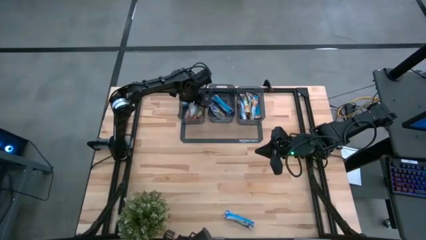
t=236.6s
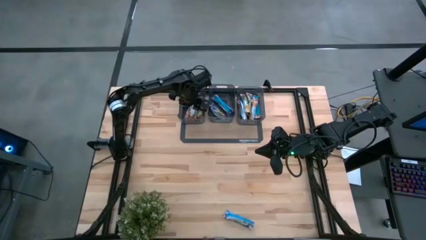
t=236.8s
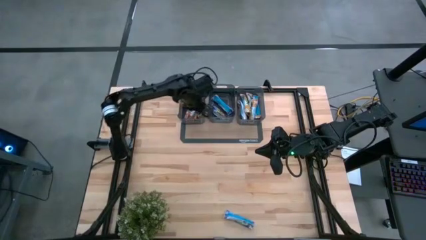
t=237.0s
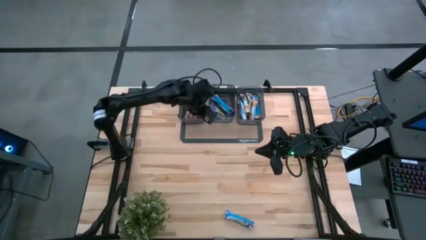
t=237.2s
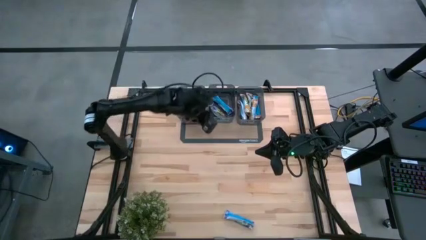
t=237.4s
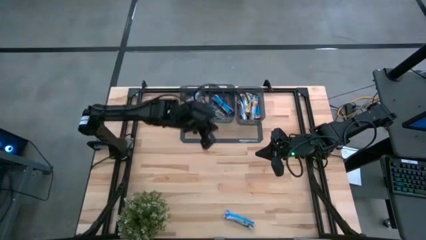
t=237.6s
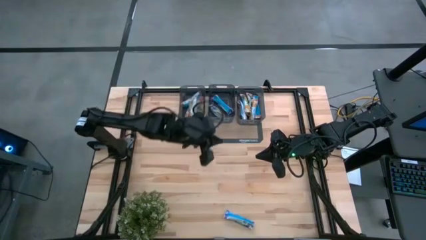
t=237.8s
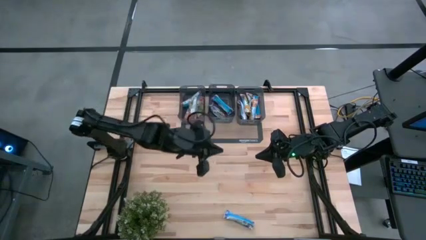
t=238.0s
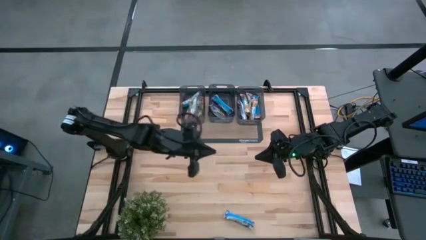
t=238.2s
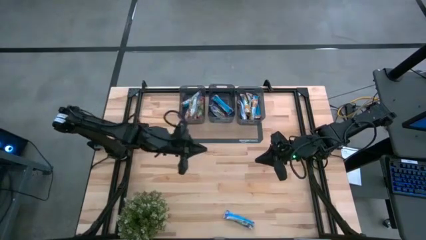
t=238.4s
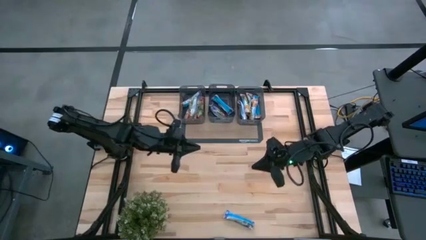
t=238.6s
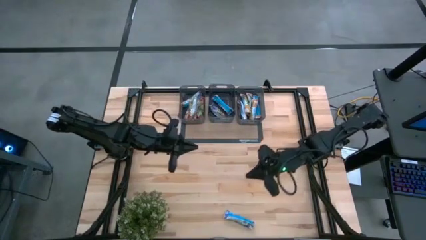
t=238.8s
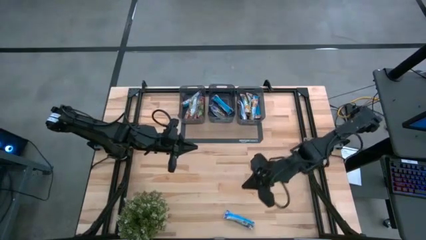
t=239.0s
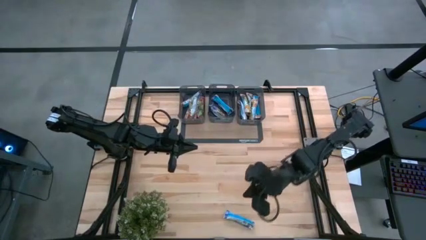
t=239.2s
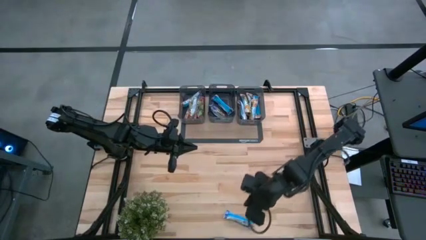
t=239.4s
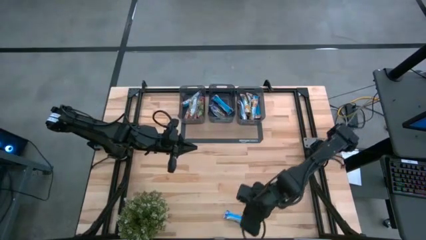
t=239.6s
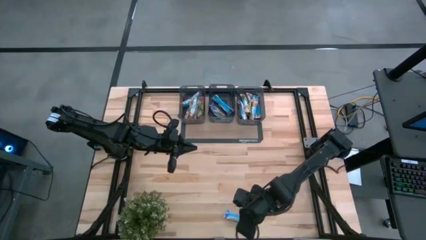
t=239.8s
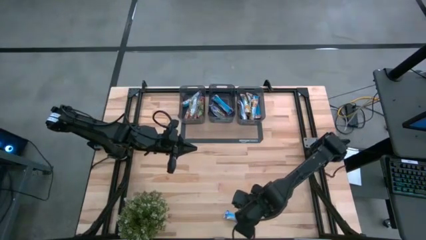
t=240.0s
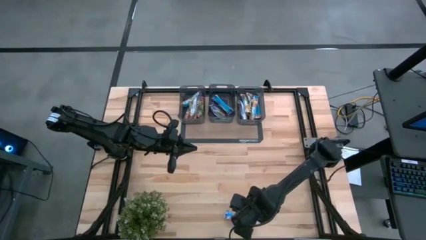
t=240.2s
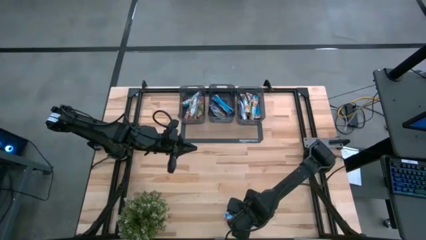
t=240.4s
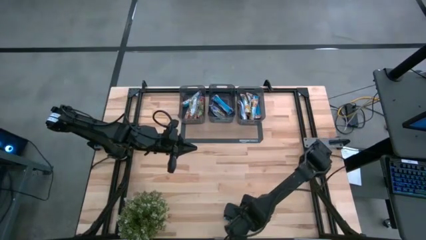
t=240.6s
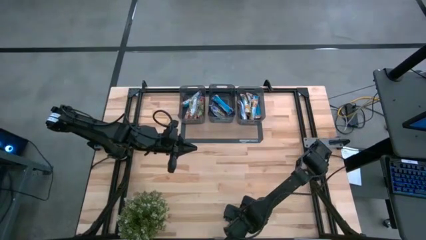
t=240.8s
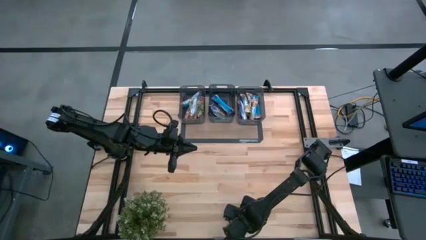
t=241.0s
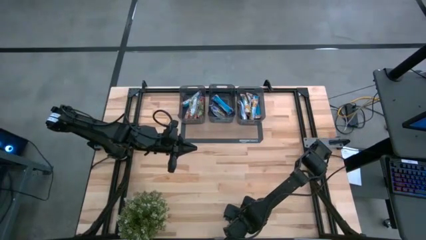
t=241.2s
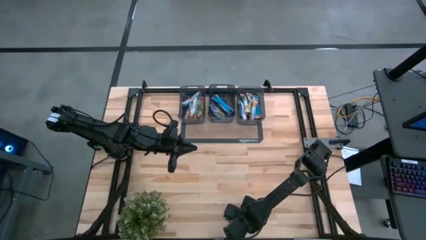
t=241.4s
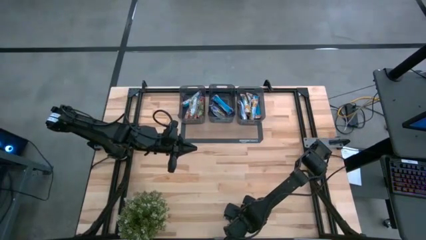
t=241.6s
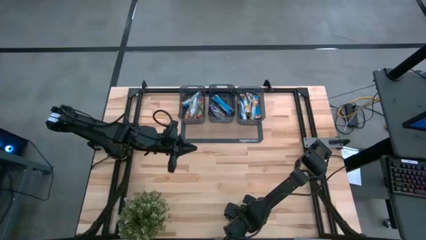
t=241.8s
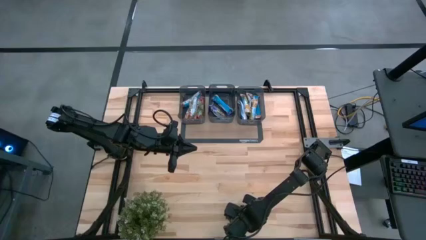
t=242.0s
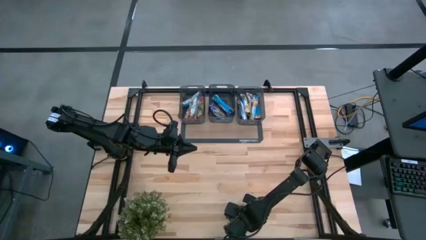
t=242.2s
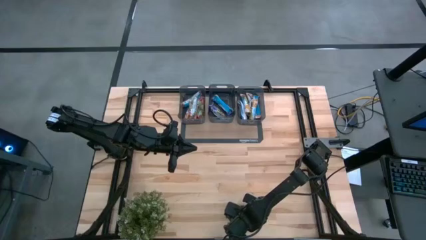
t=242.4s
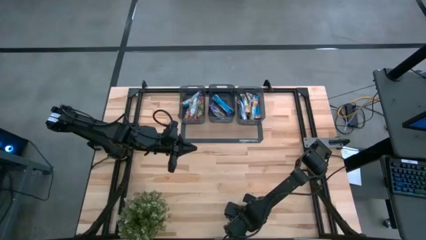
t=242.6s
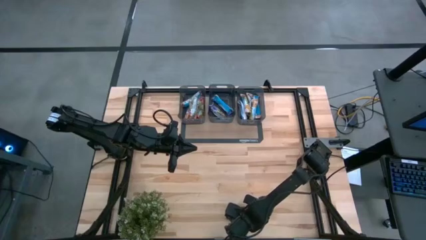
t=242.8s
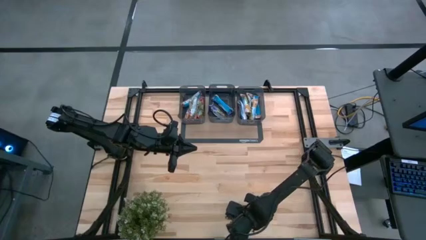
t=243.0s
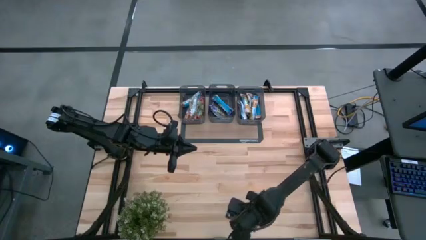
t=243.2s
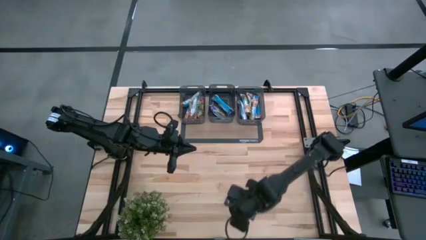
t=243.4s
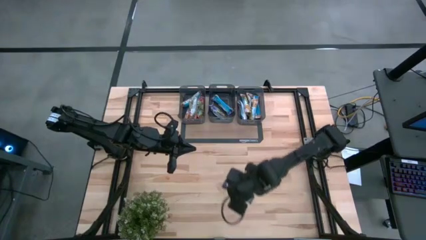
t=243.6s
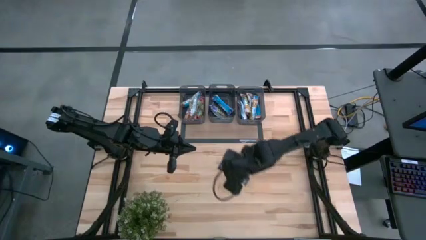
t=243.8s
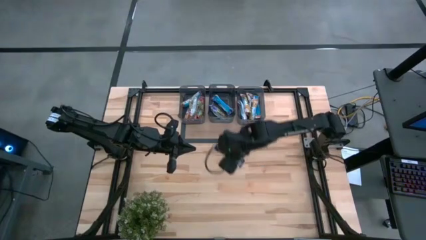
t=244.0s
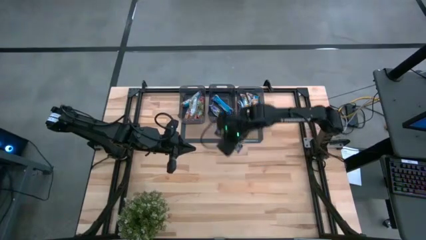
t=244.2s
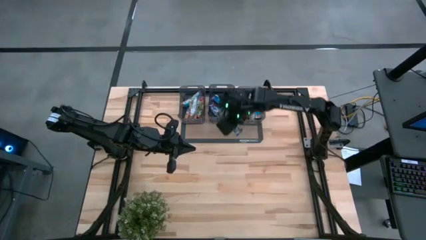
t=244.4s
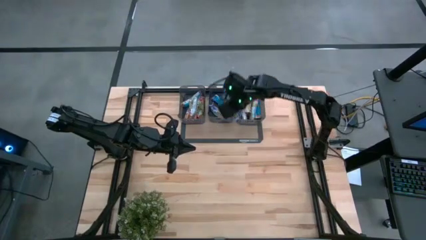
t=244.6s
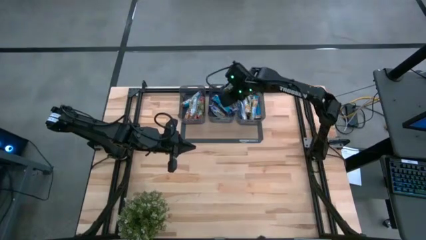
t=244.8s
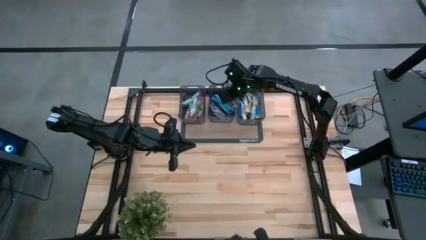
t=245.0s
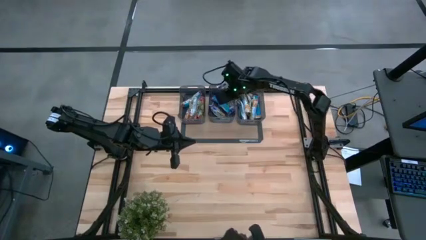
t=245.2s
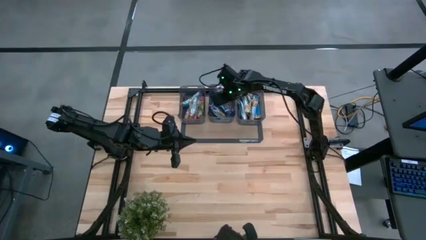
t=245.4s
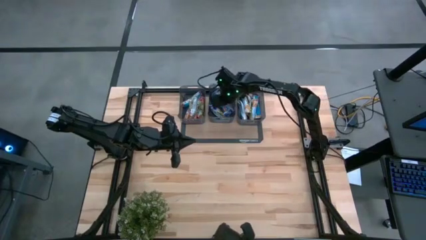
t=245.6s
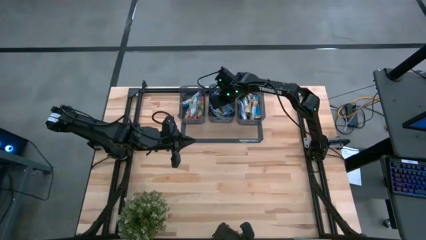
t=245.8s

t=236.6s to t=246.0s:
Task: Pick and place Granola Bars by type
Put the blue granola bar into the center black bin

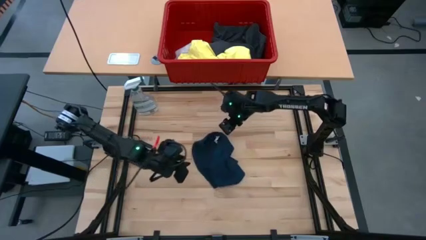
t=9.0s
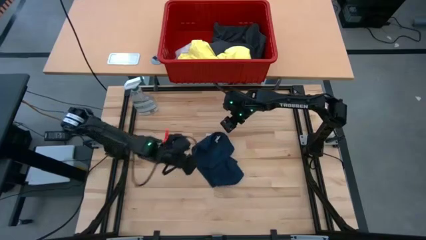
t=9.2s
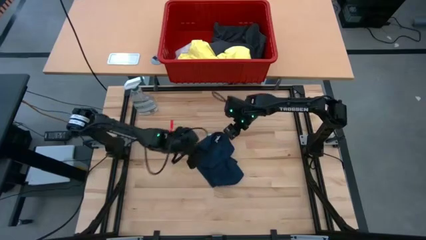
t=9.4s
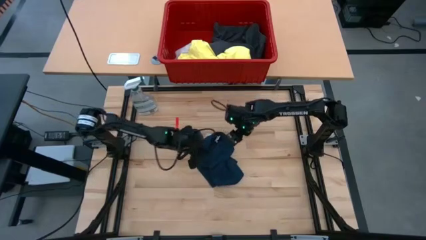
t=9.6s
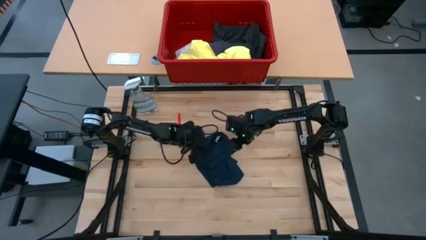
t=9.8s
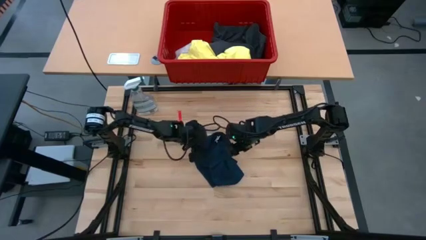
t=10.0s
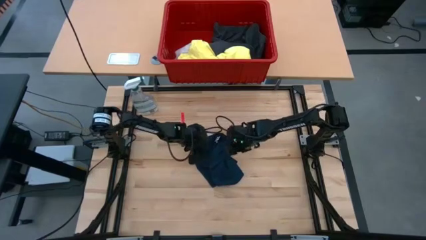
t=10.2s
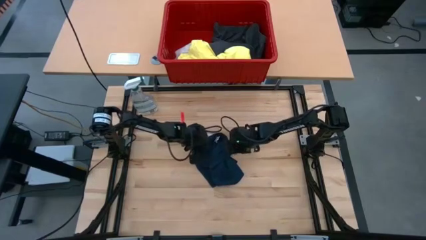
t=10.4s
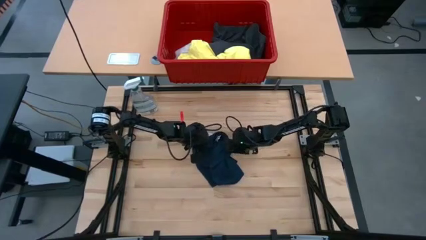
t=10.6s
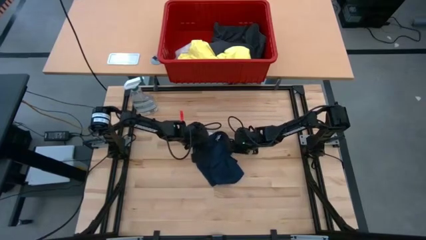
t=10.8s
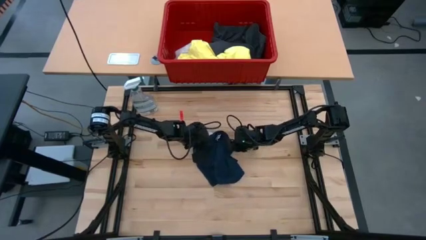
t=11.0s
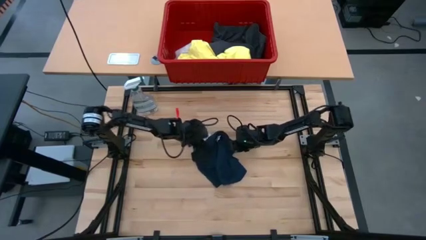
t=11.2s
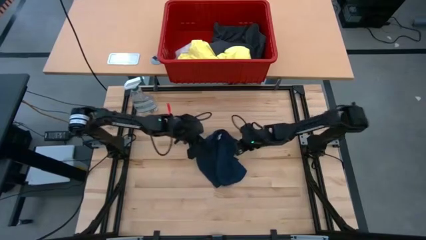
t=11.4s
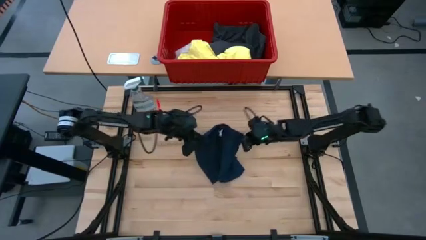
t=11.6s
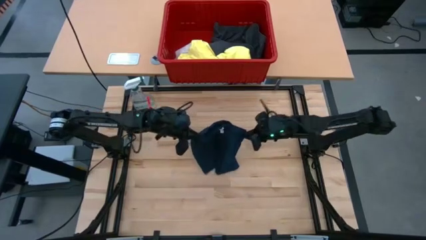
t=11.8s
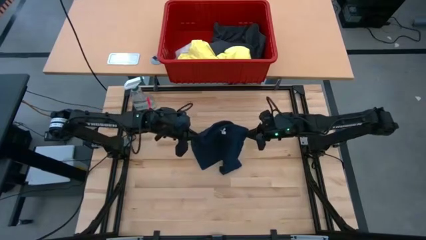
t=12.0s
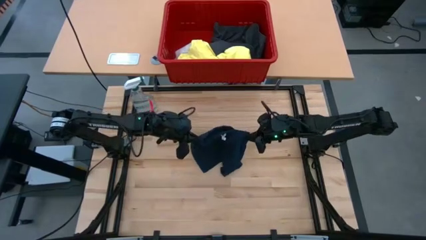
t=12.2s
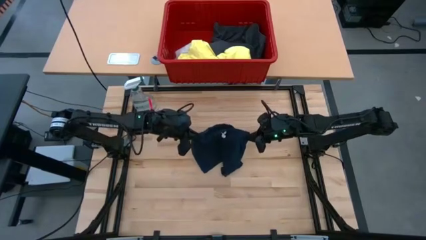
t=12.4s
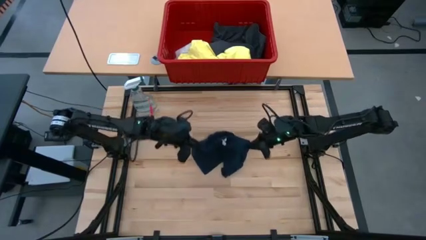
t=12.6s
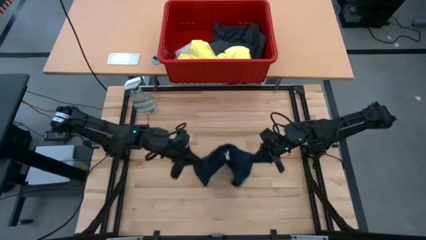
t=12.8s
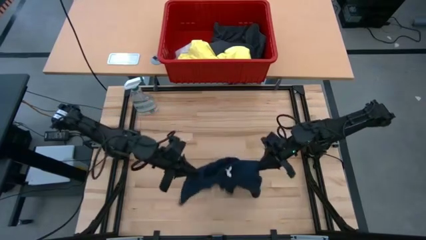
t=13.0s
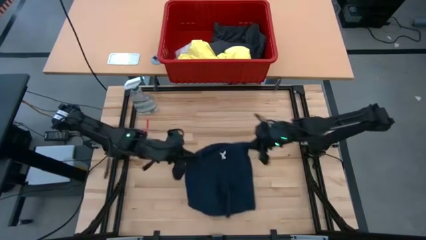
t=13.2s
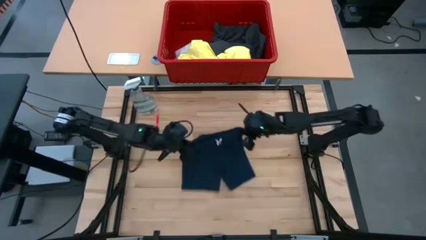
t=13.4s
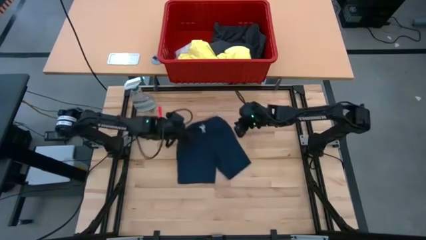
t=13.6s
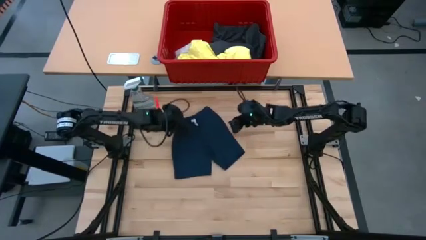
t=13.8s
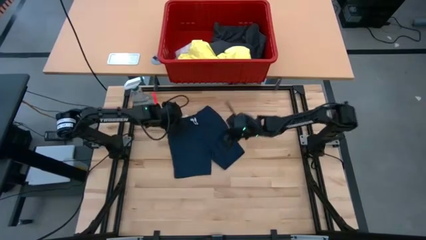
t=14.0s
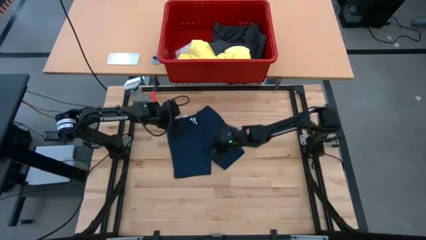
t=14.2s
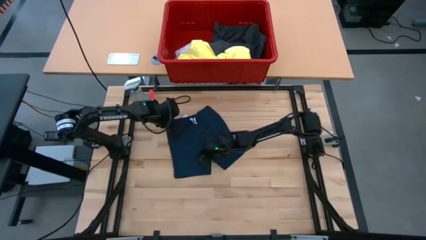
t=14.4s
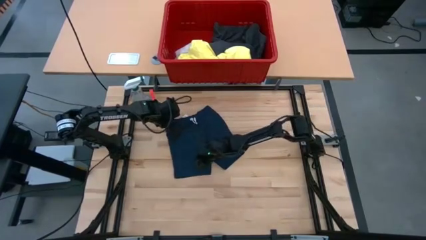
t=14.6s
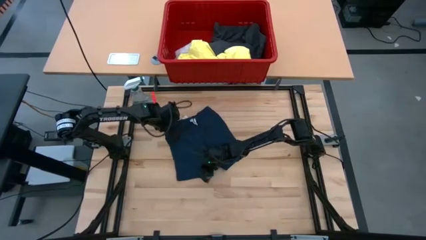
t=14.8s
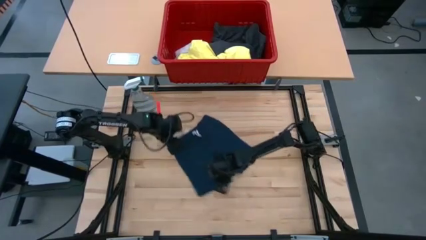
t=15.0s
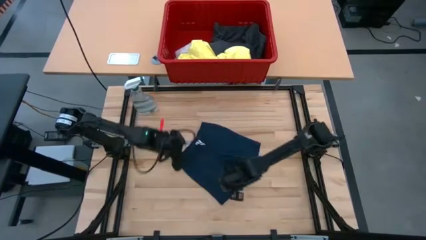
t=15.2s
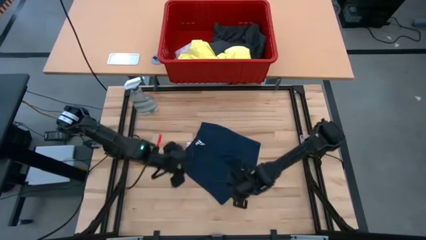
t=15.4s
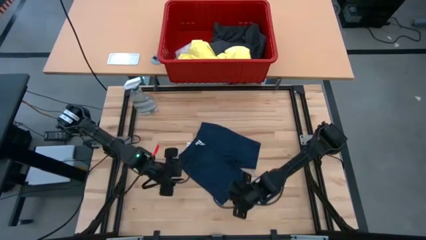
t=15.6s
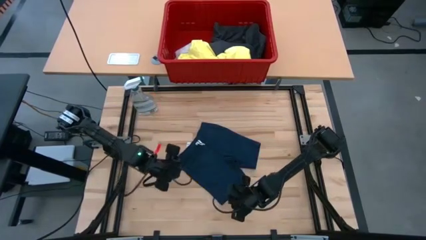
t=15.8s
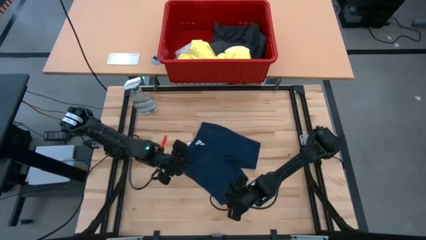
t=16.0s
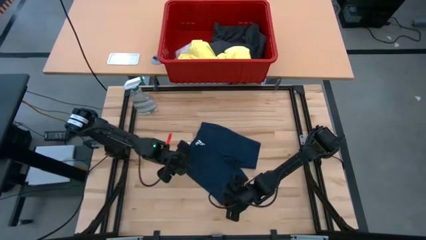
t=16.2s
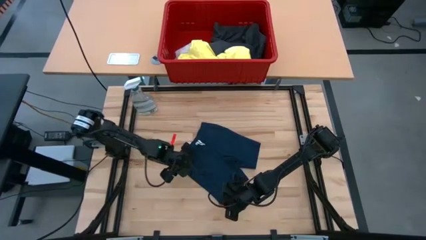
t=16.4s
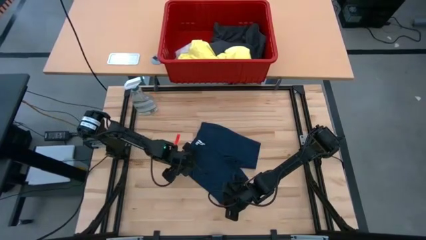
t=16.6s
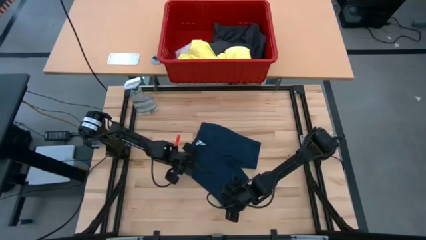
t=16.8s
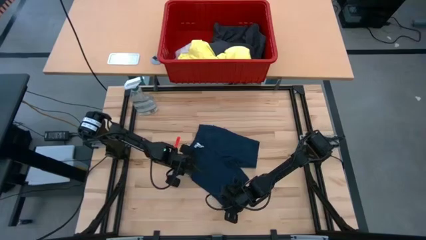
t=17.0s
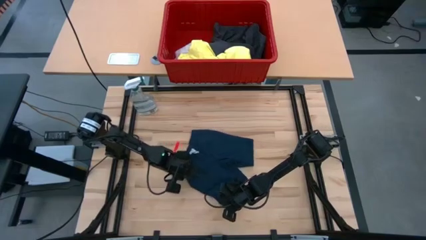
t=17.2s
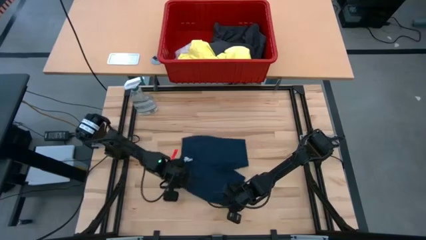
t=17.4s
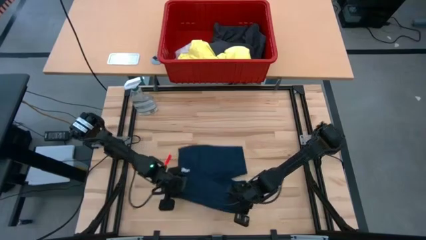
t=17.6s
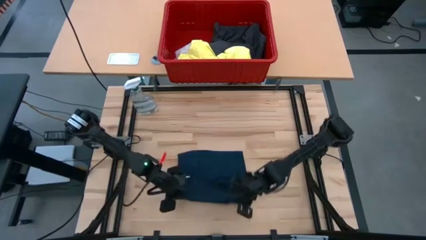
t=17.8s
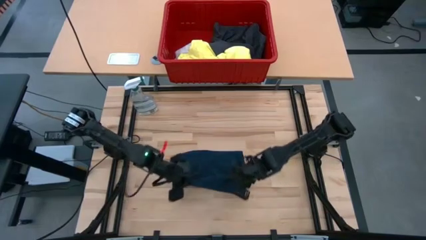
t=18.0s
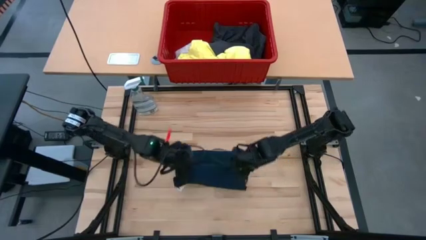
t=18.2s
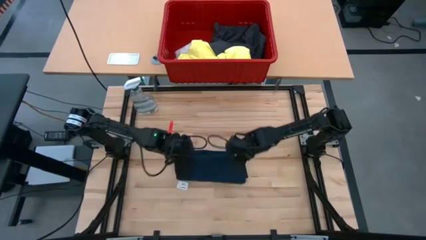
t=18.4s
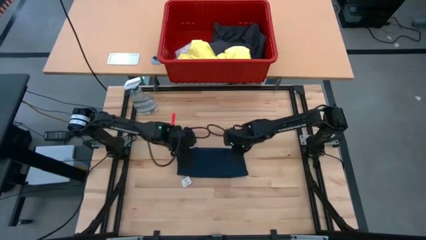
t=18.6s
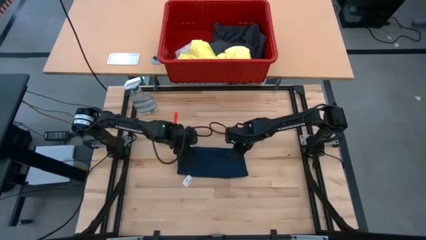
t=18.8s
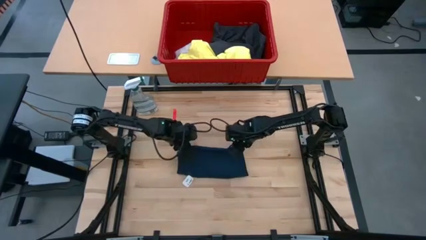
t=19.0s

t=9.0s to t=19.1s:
Task: Fold laundry
Fold the dark blue shorts
